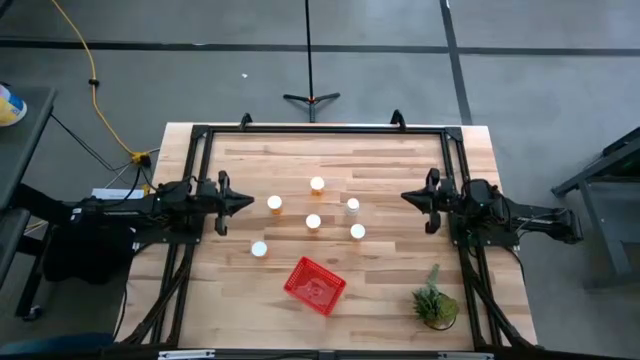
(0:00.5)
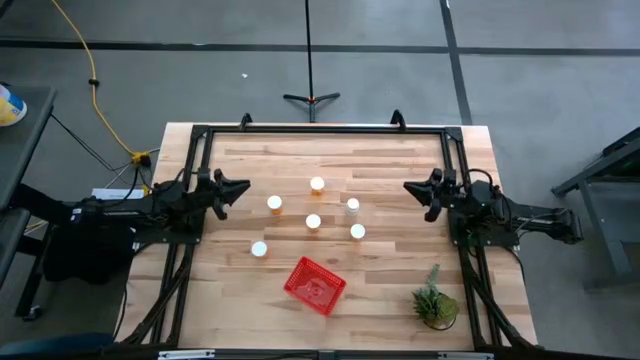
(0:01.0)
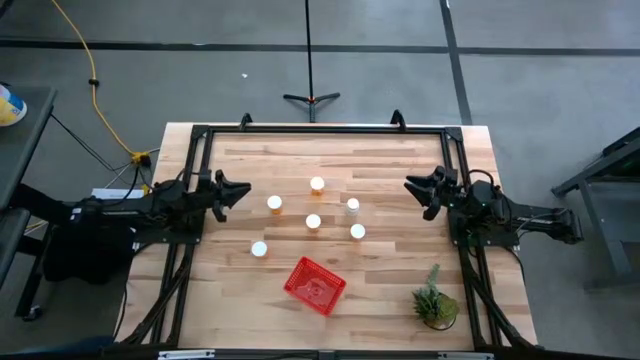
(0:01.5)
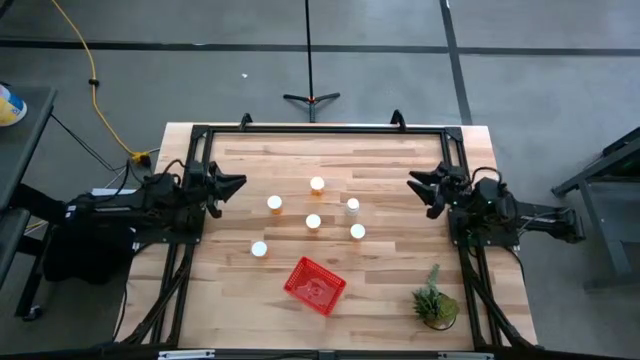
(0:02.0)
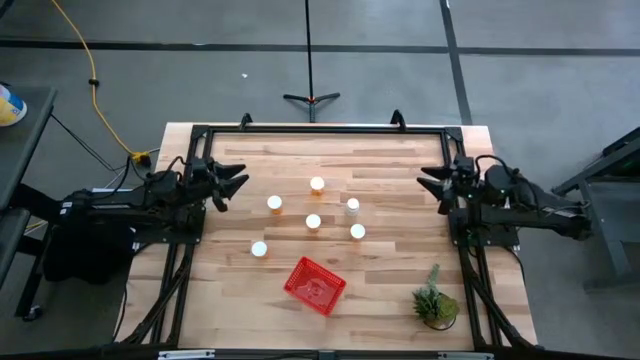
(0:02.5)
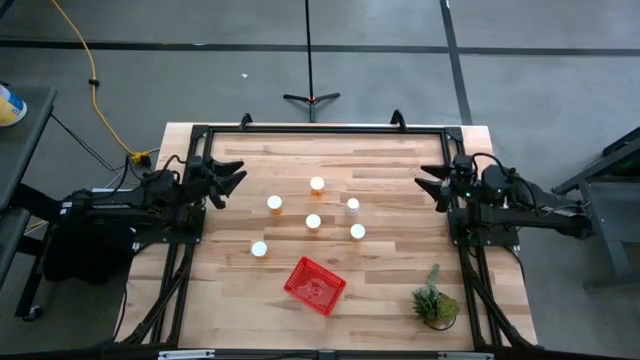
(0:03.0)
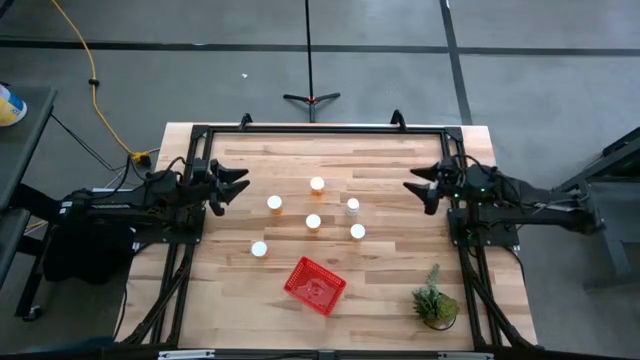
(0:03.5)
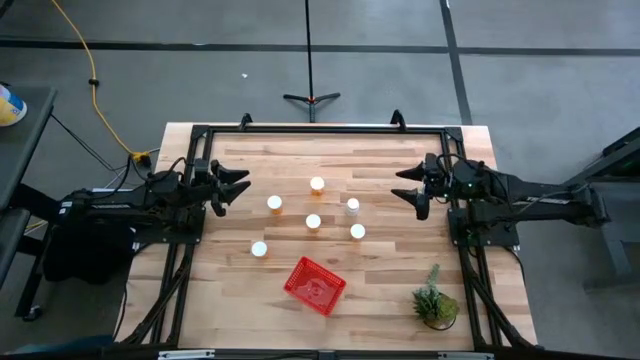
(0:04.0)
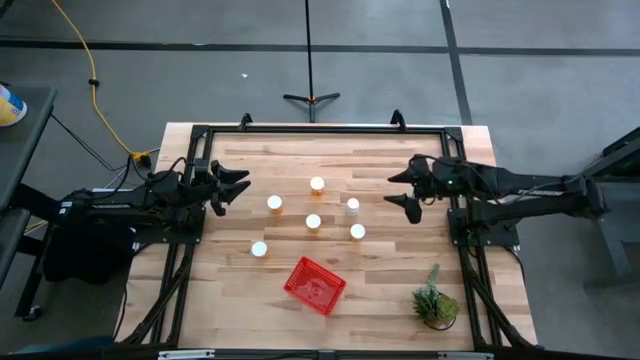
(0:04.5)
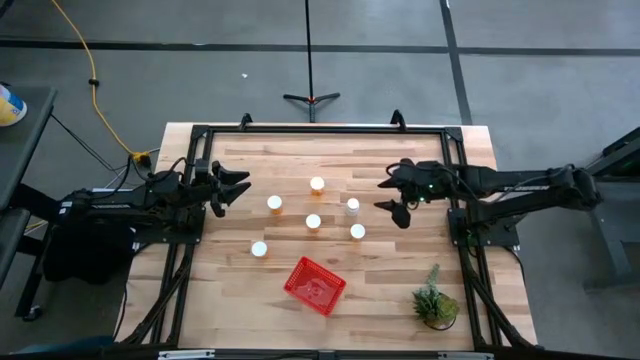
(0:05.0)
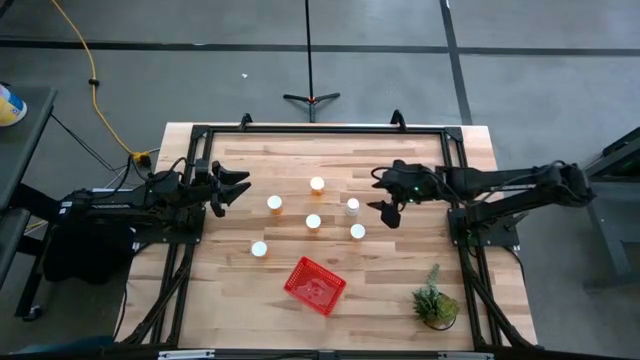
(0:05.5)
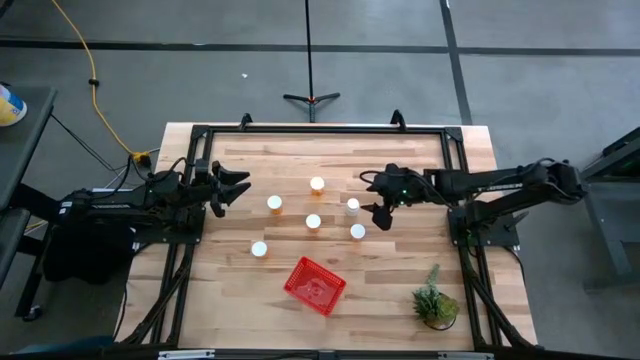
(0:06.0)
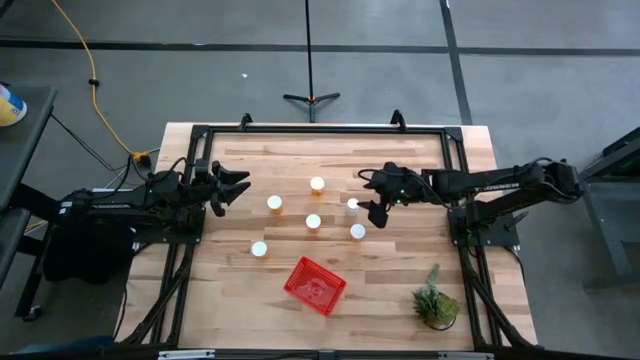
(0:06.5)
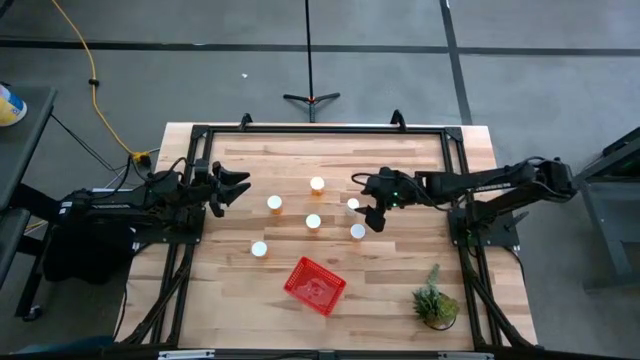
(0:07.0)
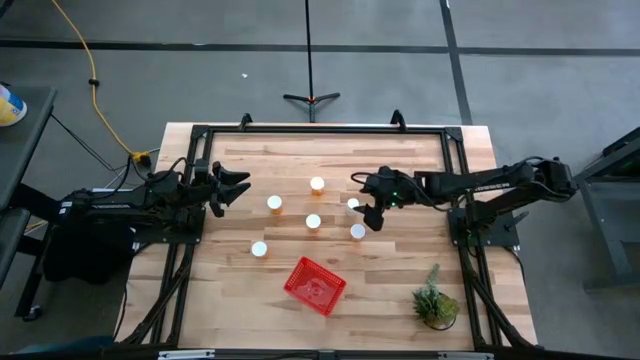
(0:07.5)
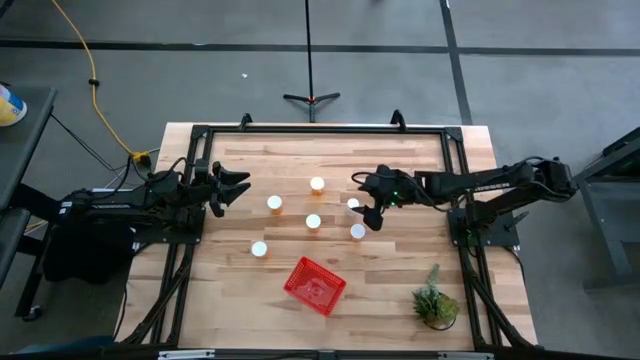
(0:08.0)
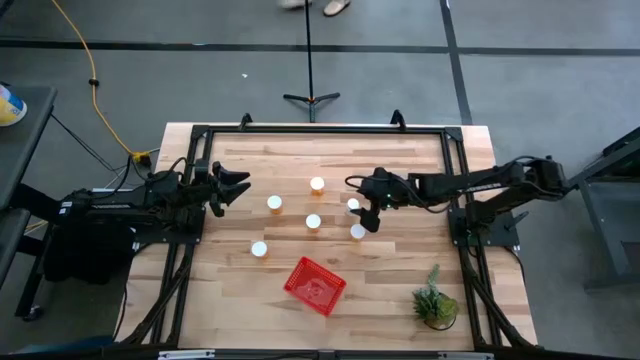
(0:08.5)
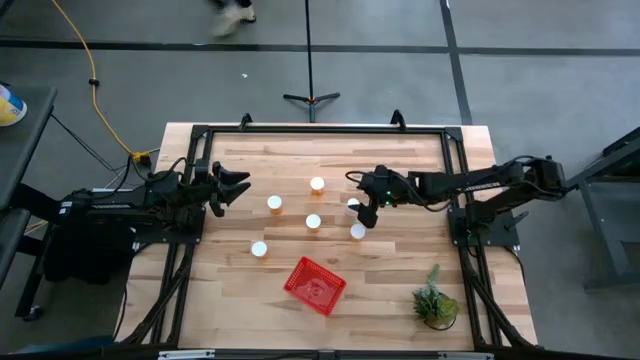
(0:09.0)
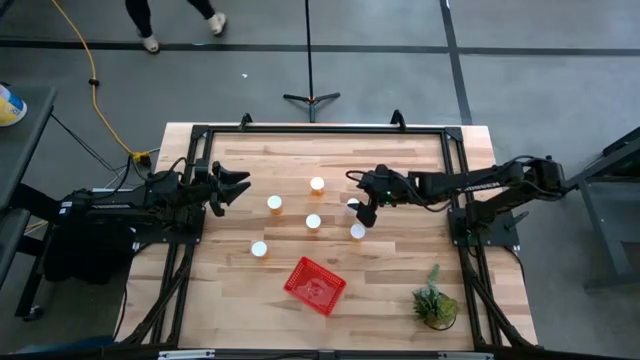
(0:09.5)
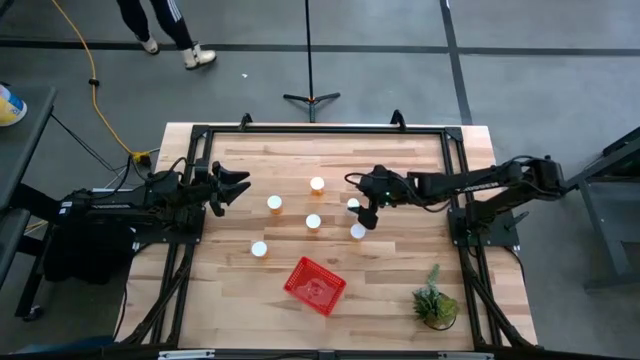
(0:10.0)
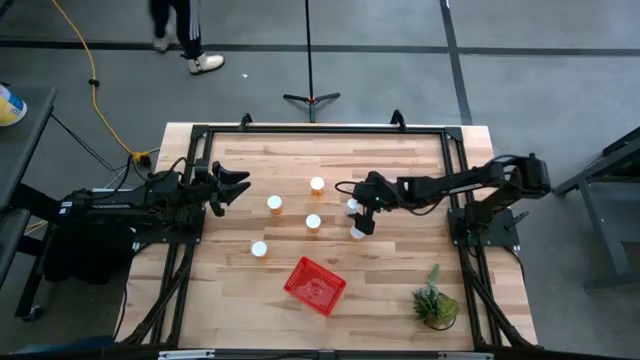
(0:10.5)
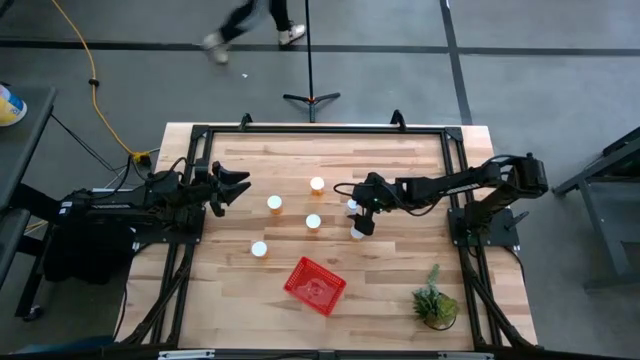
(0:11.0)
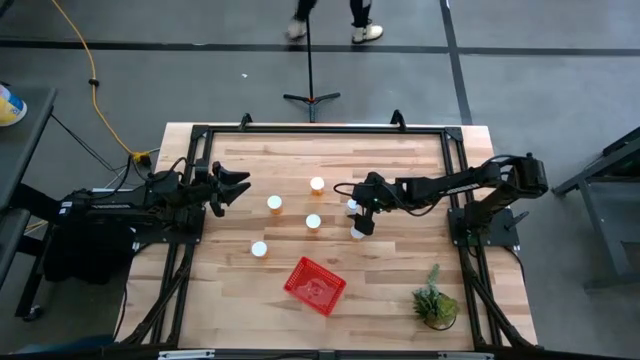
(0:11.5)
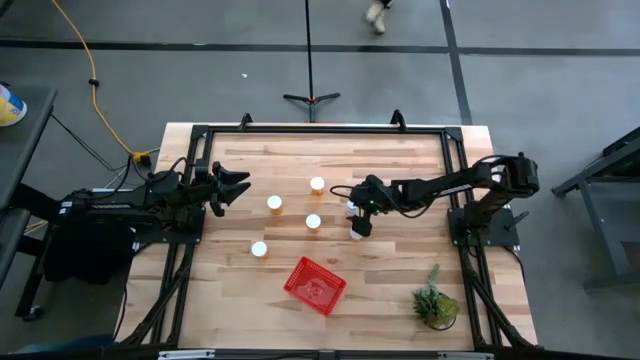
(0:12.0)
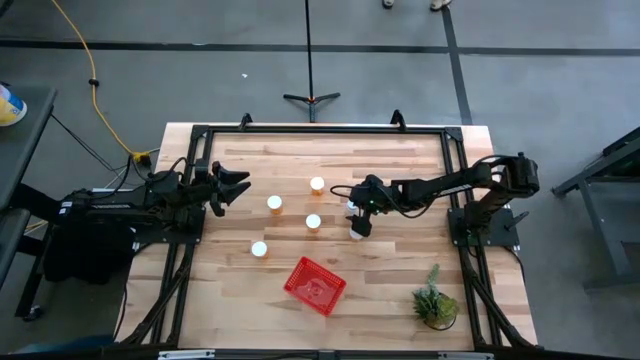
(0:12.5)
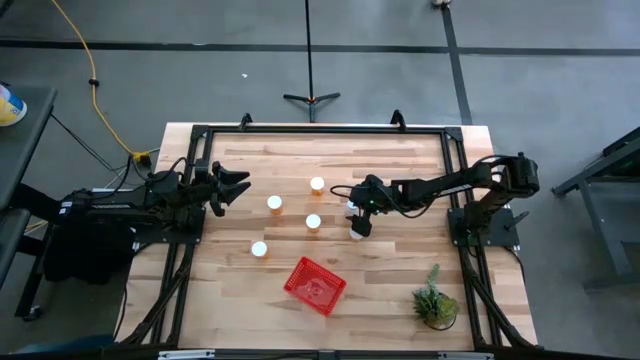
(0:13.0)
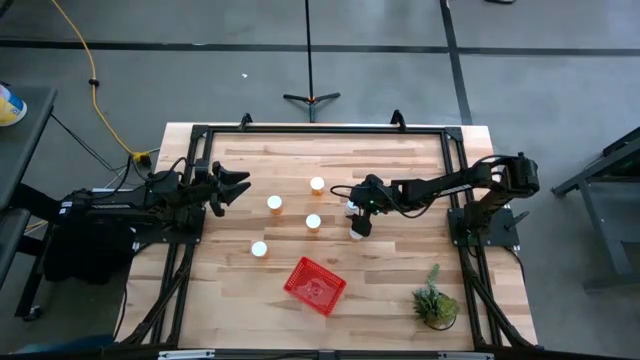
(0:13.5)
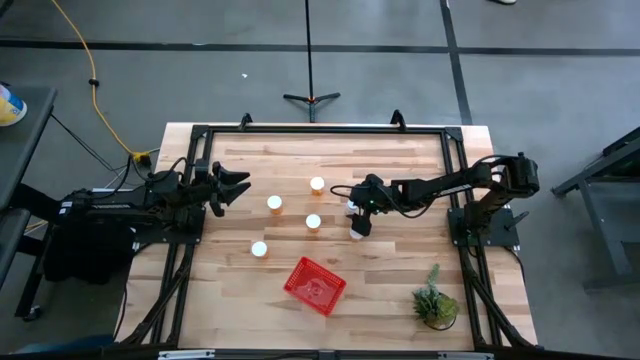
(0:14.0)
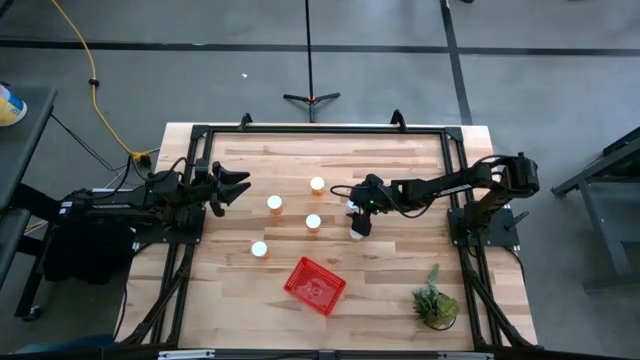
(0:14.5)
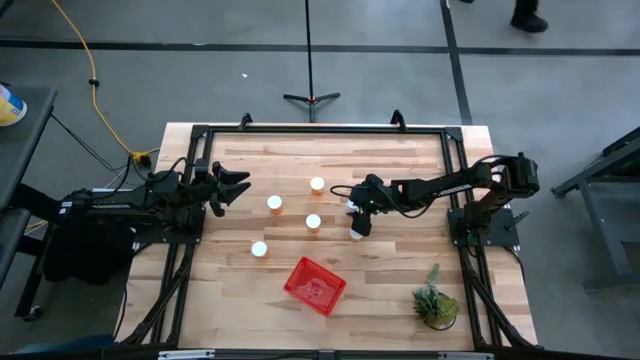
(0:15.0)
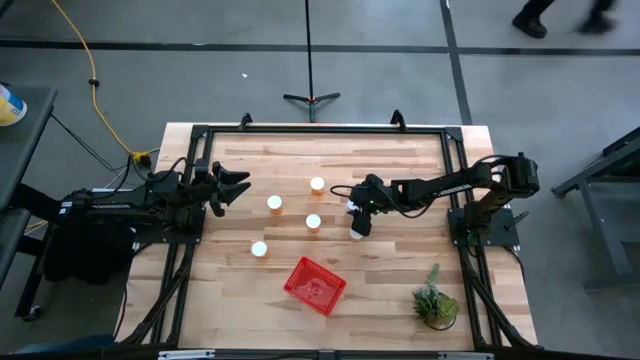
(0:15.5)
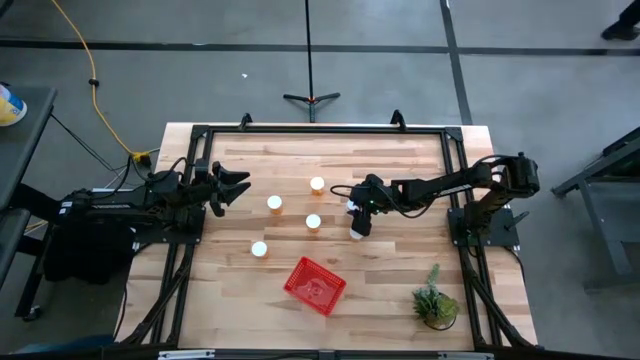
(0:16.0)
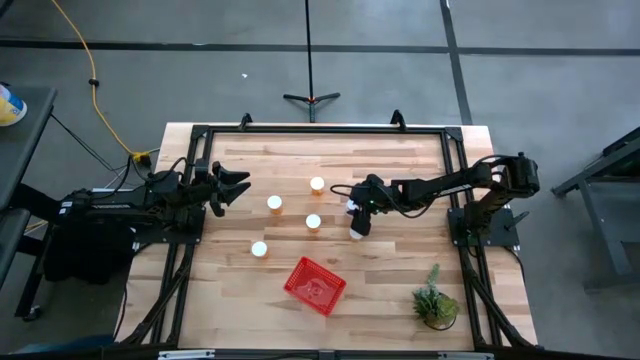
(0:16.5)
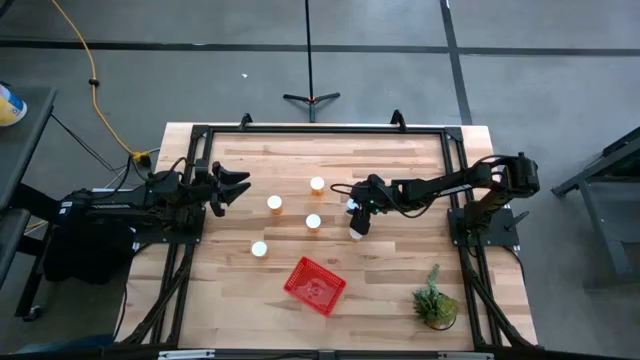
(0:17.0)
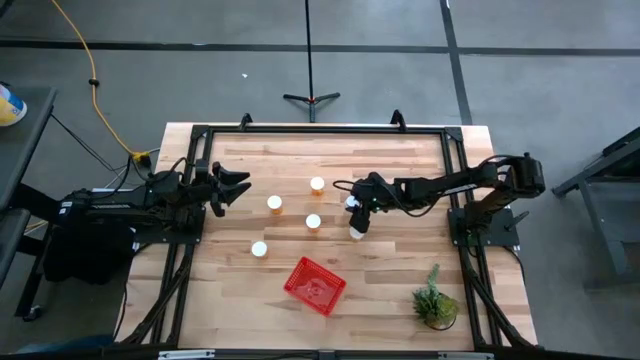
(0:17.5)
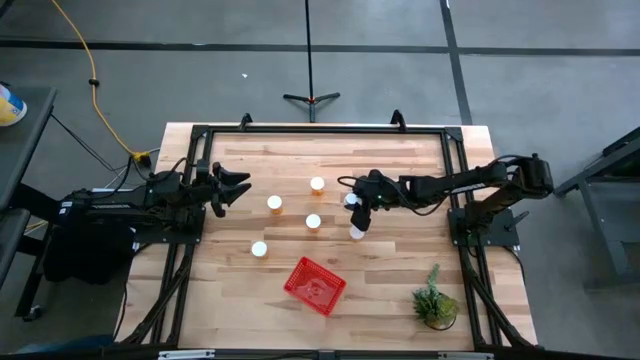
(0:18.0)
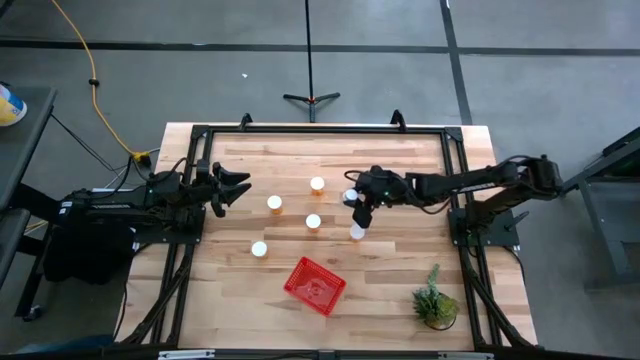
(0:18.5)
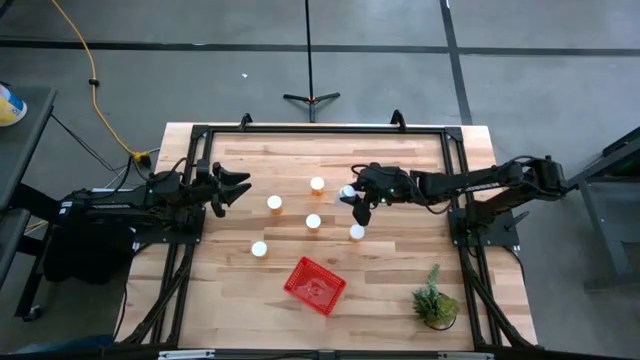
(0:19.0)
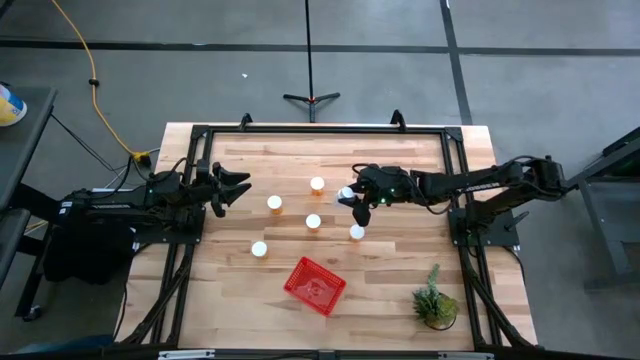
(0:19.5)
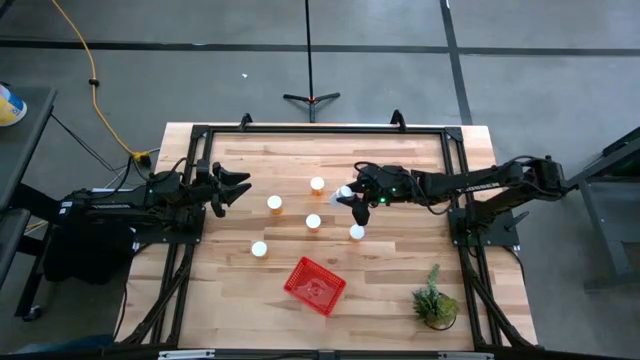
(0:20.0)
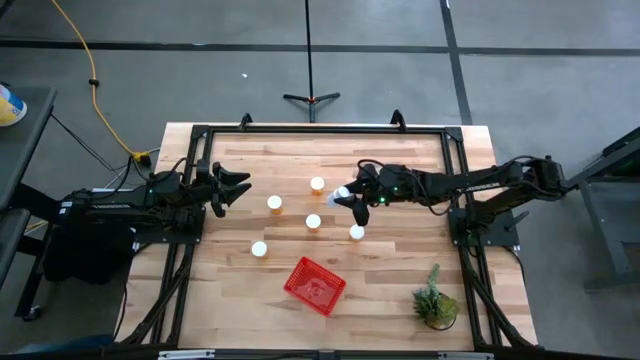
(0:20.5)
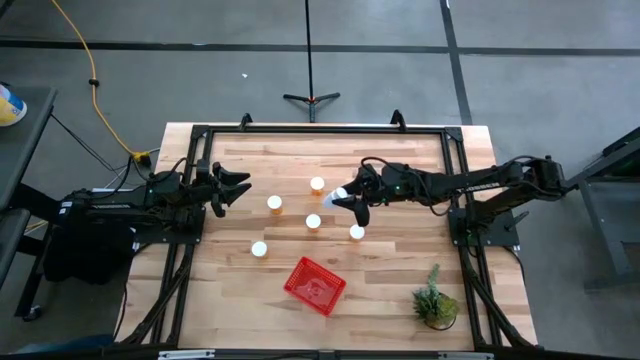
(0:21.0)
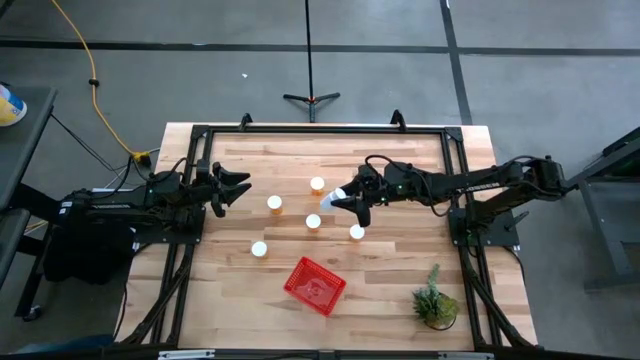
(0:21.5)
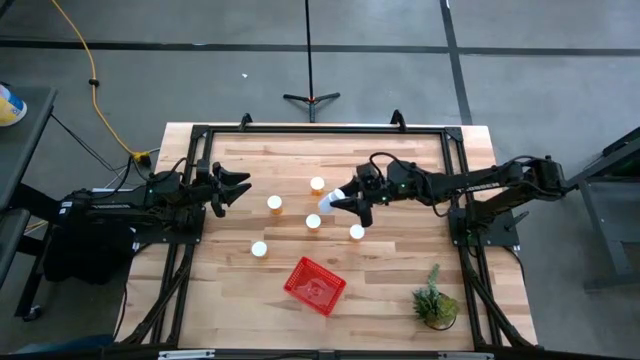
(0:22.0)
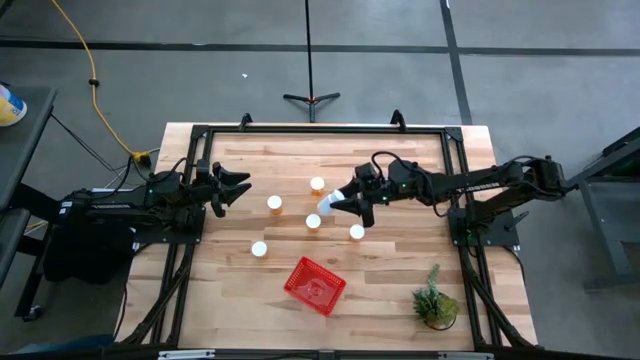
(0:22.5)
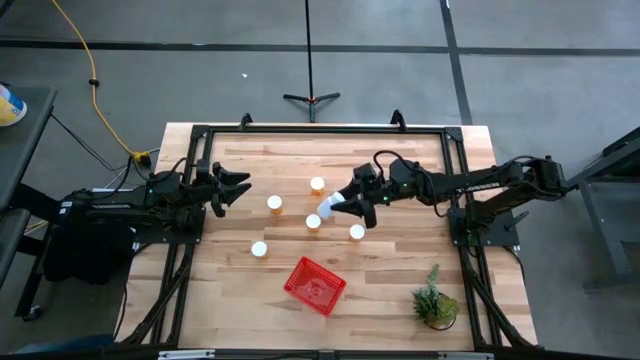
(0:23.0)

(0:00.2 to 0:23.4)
Task: Pick and place pill bottles into a basket
Put the white pill bottle into the red basket
